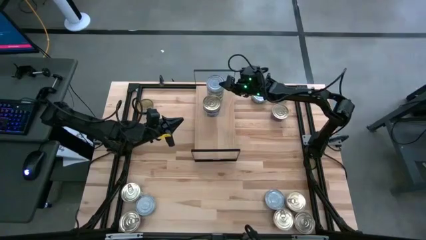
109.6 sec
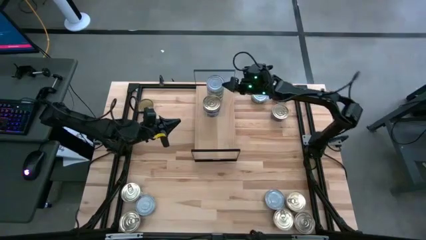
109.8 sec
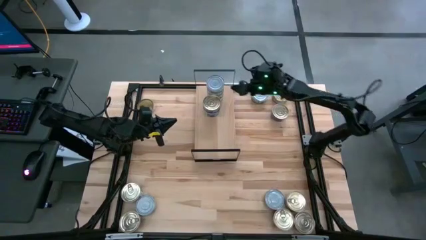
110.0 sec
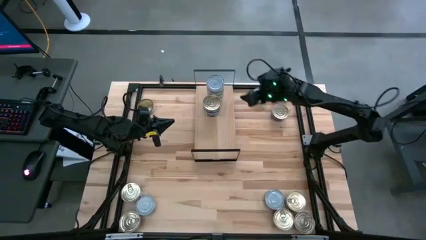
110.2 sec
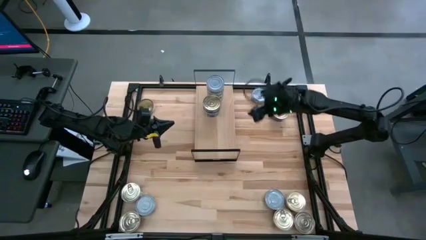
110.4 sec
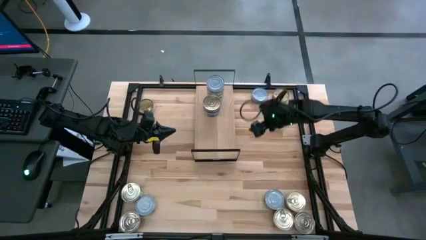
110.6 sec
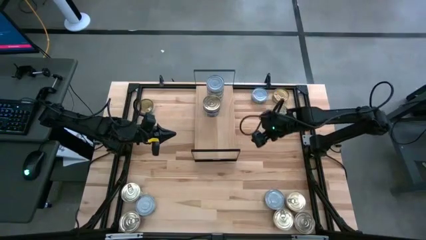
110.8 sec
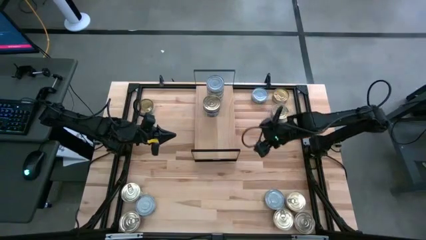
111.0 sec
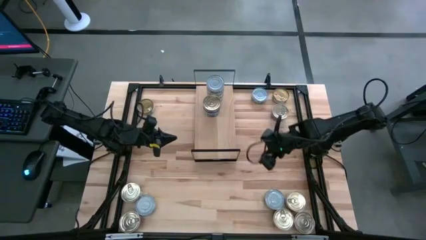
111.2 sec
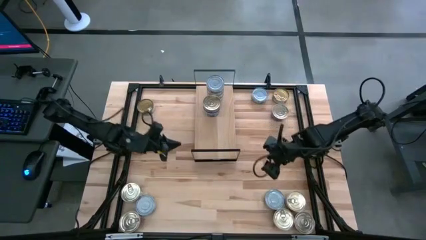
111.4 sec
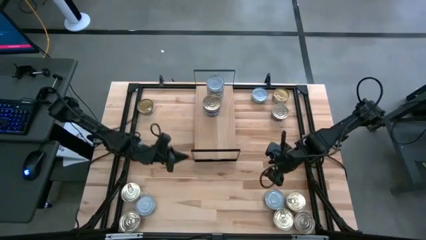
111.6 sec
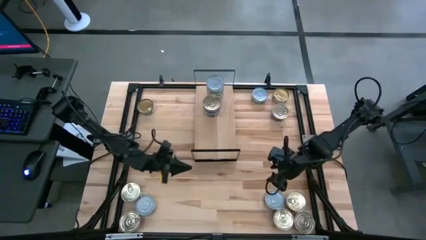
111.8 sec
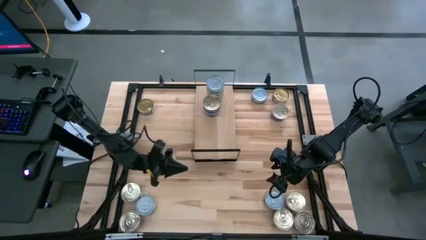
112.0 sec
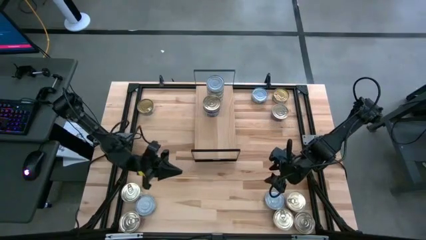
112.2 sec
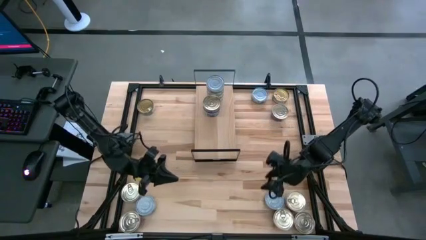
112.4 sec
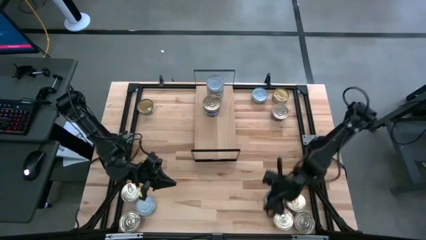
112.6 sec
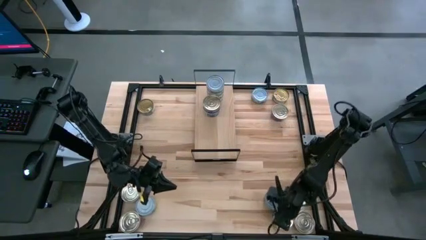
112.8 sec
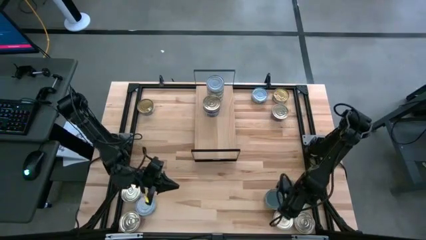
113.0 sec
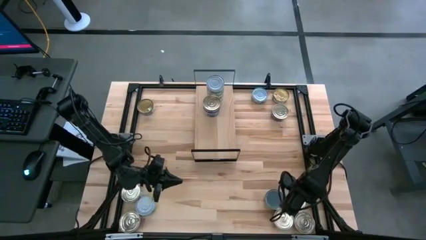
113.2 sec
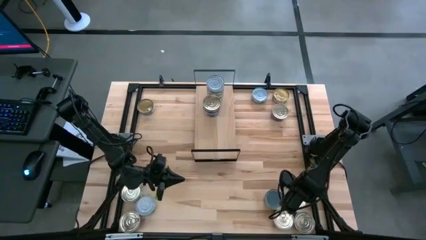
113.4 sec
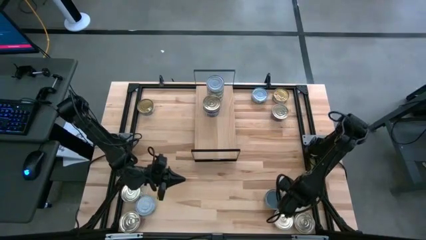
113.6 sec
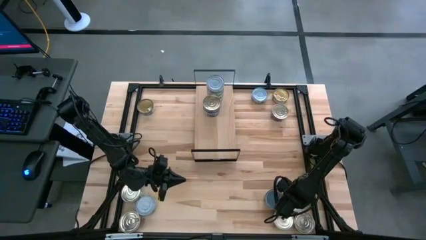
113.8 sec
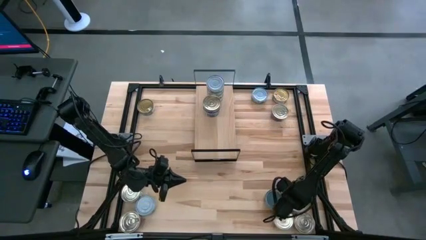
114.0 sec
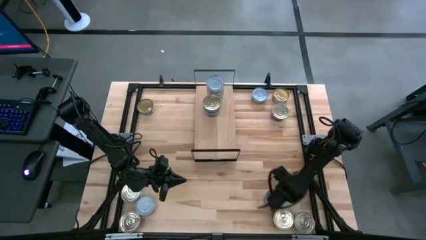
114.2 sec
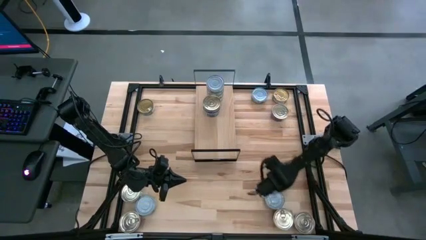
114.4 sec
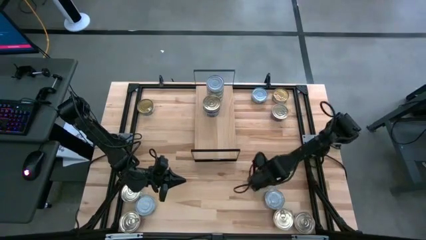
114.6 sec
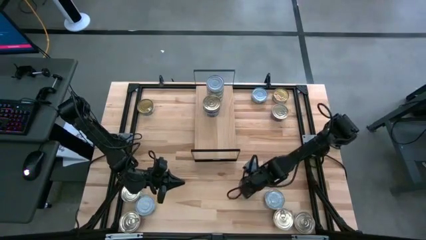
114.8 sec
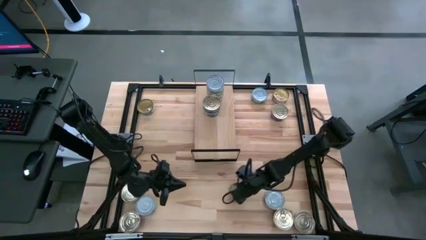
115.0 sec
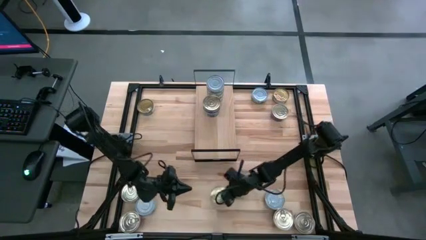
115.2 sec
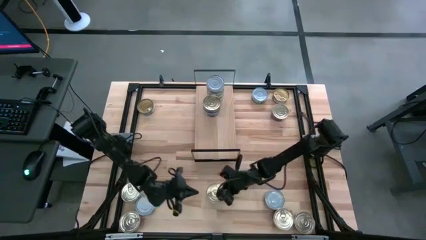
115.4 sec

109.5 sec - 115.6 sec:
Task: Stack canned seafood by type on shelf
Move the pink and blue tuna can to the bottom middle of the table

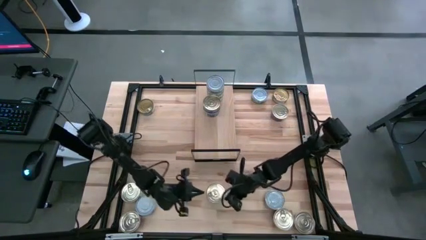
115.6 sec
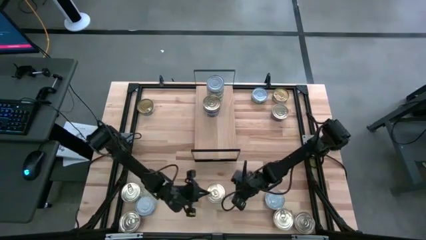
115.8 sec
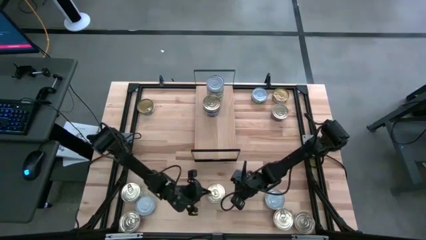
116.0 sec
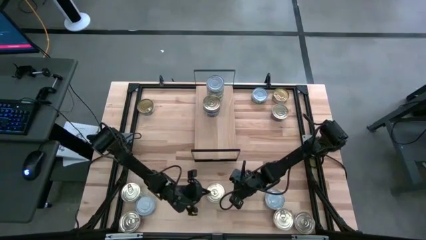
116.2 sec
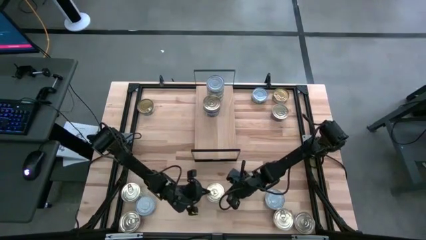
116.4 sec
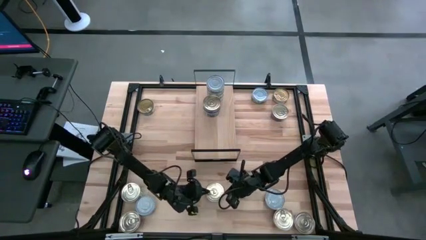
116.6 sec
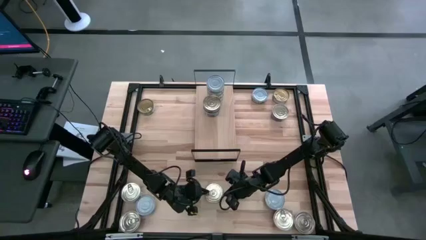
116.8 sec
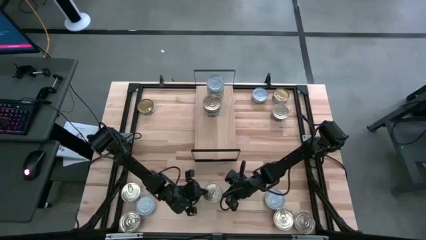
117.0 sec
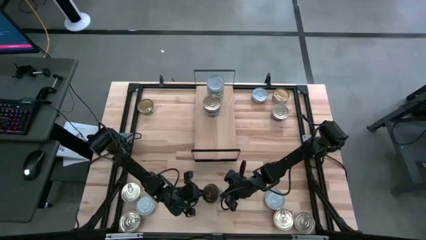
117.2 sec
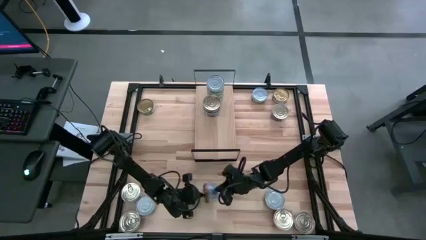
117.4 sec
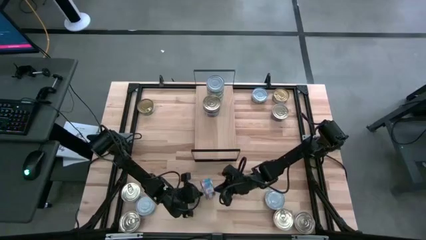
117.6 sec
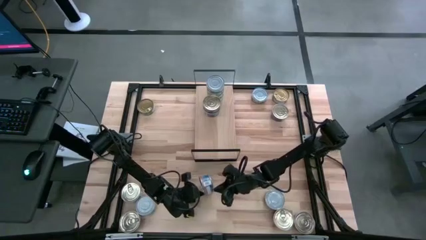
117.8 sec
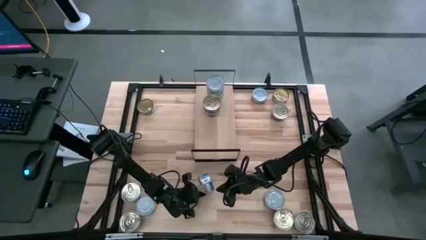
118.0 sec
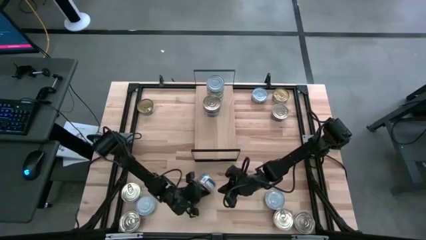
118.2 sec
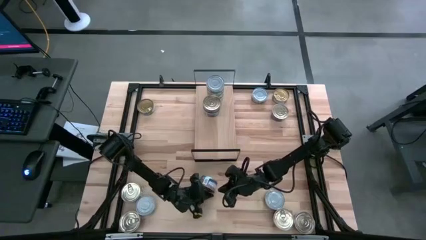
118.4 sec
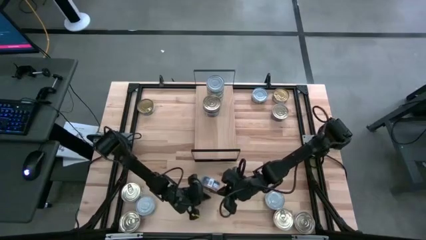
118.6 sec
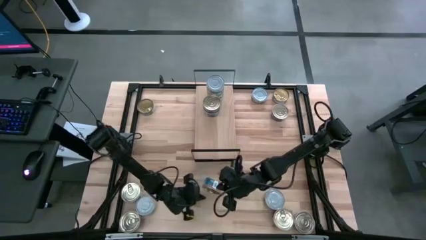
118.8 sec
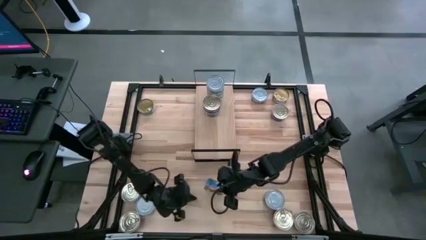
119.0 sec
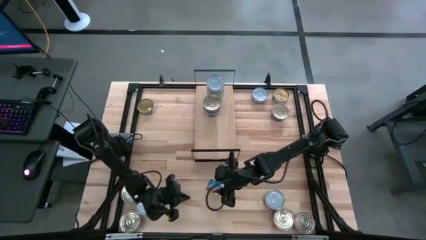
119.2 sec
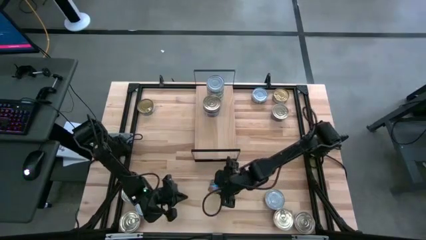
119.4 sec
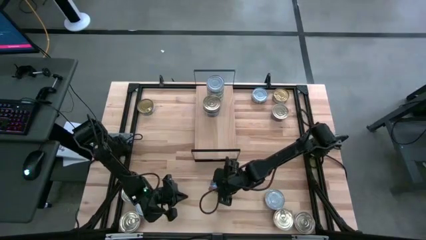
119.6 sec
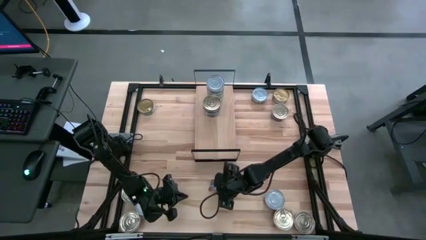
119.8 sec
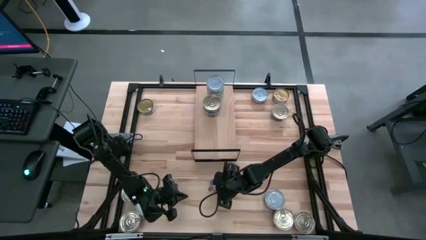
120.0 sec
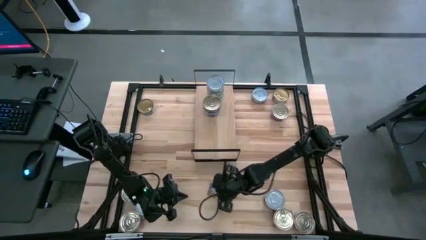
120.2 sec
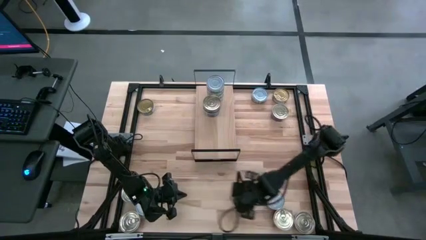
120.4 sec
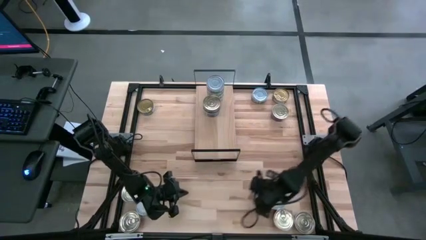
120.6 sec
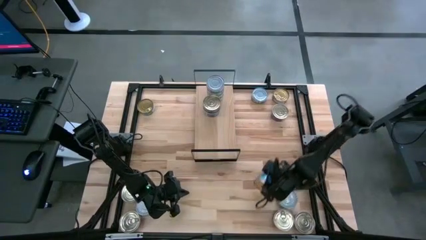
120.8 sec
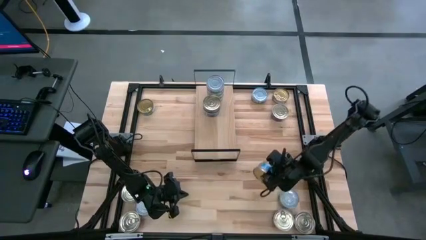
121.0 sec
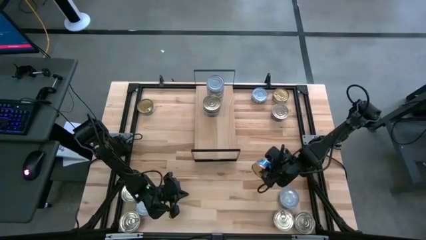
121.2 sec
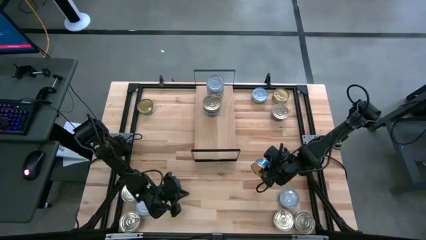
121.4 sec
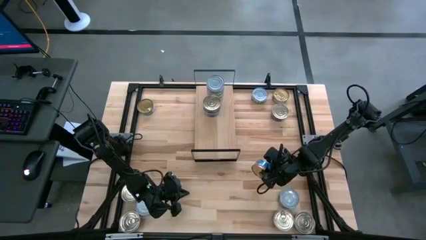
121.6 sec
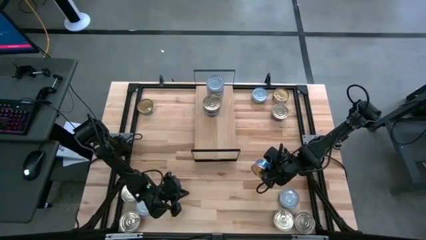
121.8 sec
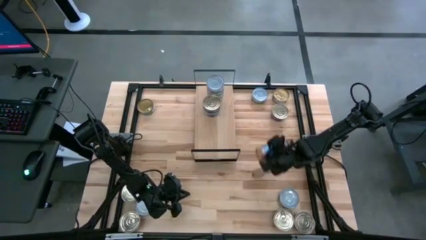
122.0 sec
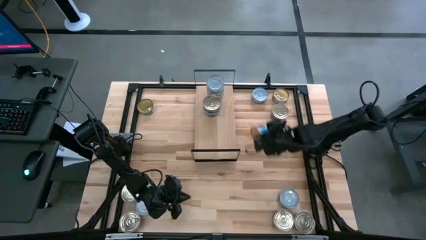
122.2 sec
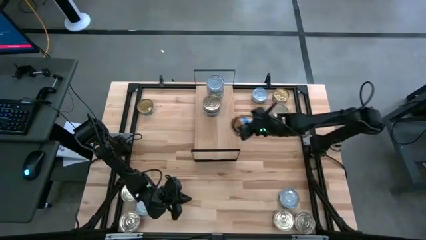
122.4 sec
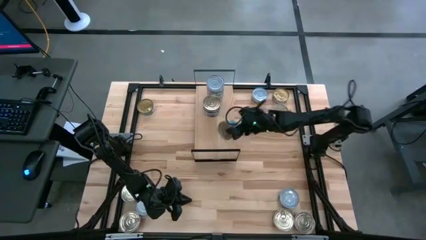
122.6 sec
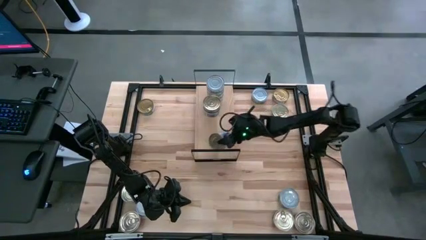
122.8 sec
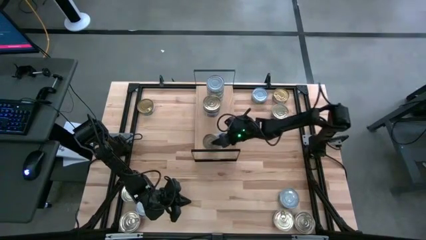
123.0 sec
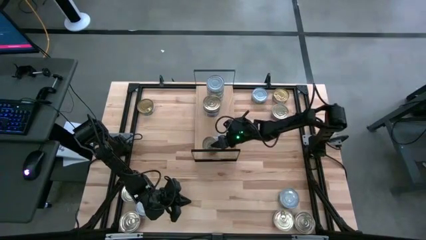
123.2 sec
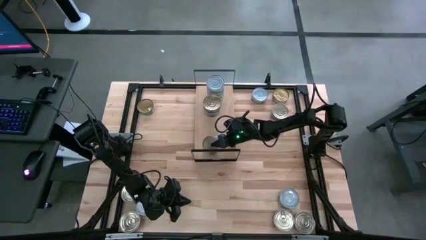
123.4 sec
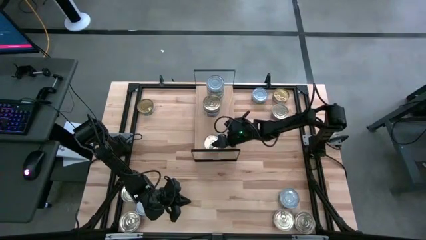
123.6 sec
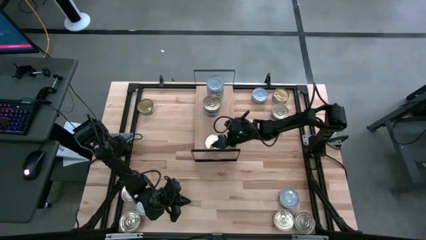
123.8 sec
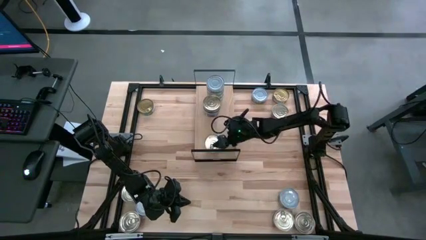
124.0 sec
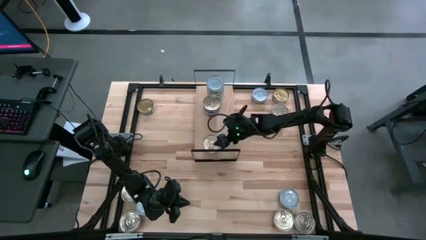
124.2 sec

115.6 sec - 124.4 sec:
Put the pink and blue tuna can on the shelf

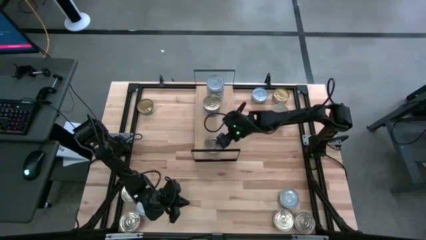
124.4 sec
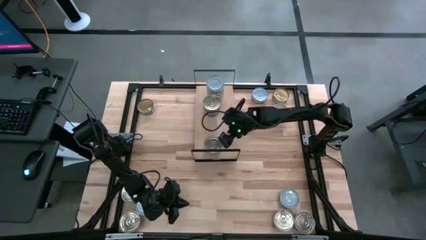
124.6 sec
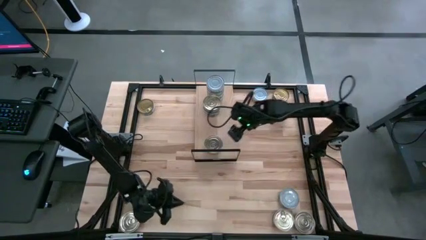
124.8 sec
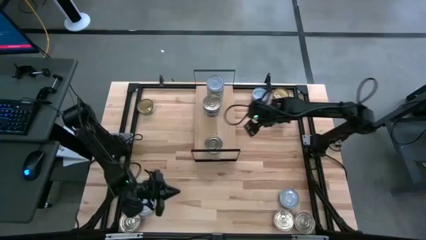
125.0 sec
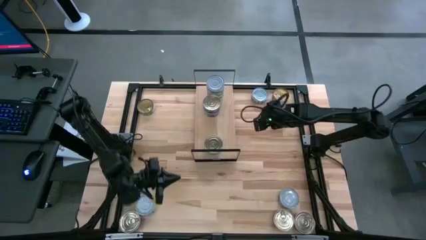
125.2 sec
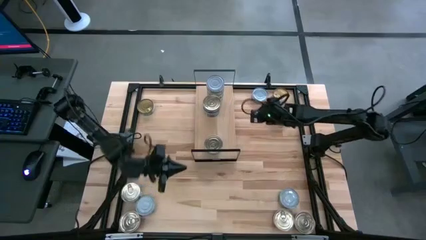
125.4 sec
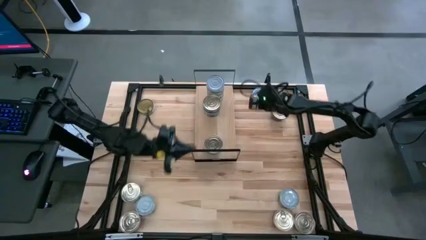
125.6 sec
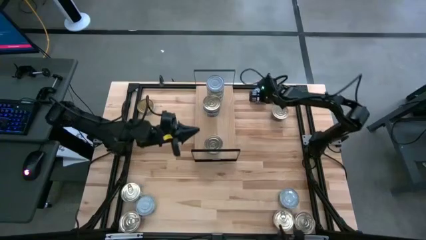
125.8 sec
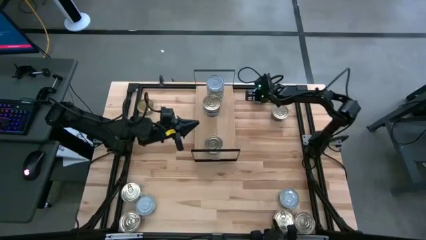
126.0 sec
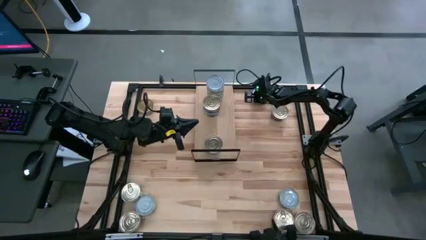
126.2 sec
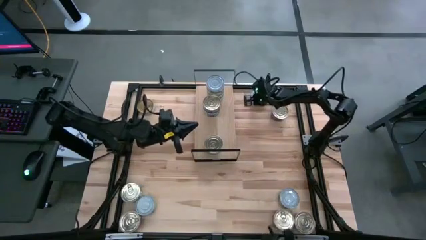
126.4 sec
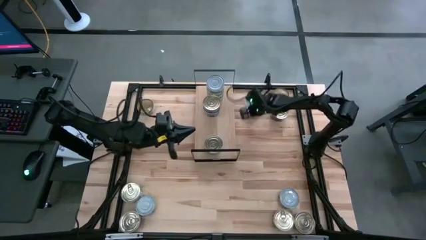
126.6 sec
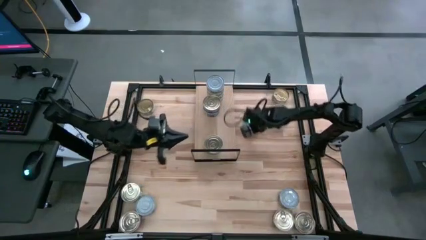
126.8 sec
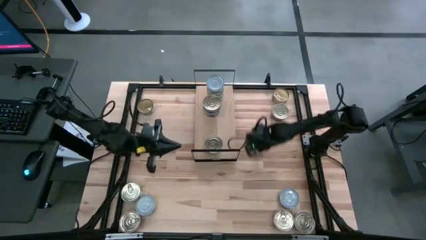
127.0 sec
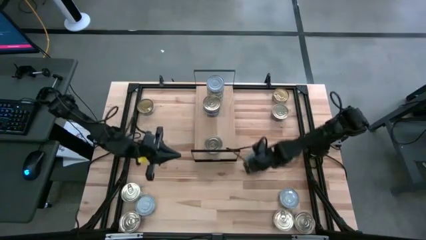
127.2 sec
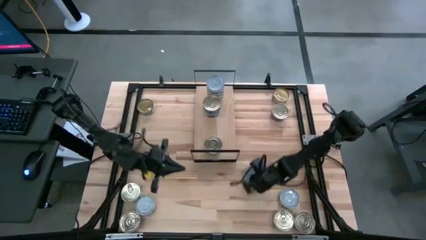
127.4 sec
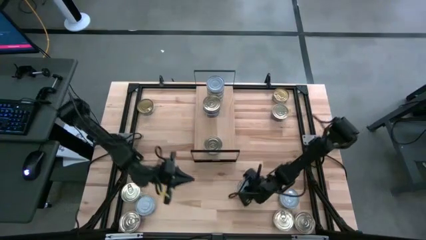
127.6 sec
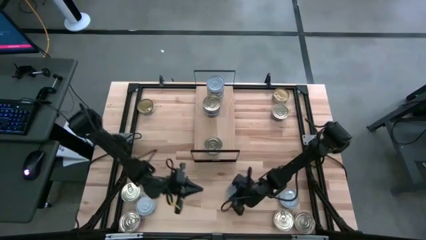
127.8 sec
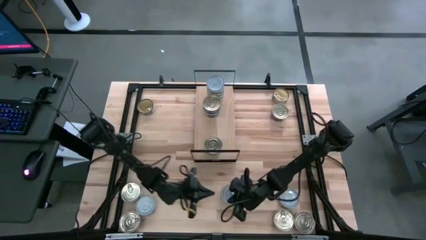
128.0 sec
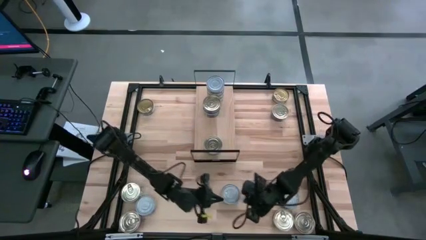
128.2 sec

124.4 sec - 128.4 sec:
Move the green tuna can to the bottom middle of the table
